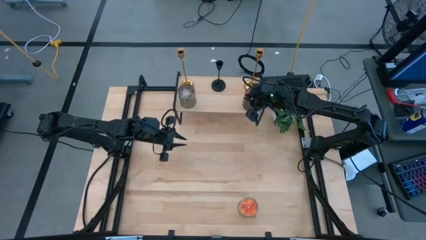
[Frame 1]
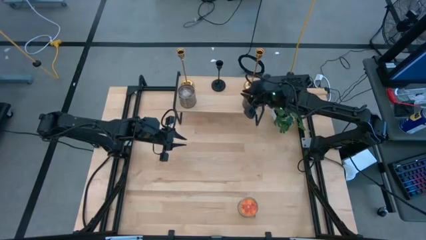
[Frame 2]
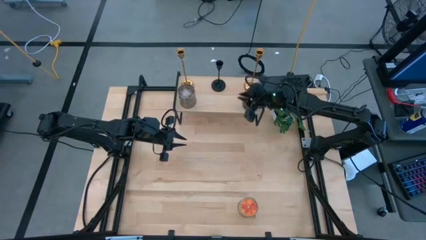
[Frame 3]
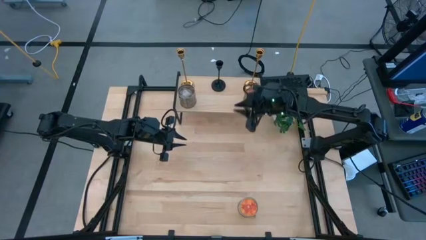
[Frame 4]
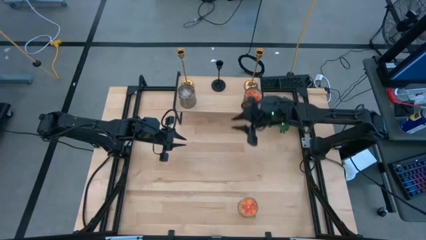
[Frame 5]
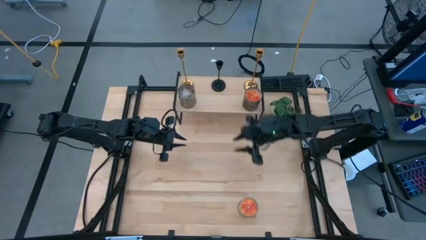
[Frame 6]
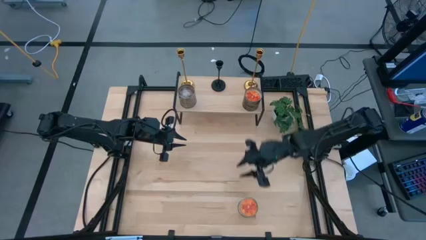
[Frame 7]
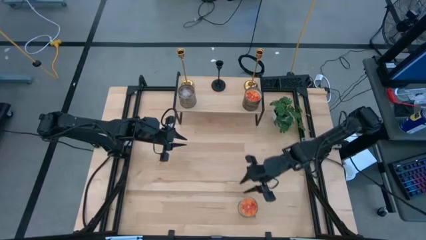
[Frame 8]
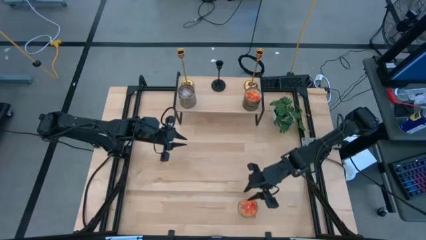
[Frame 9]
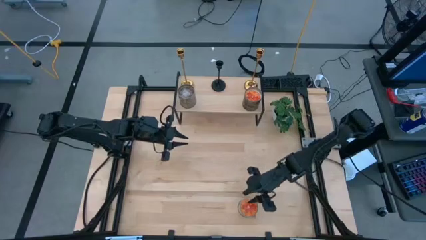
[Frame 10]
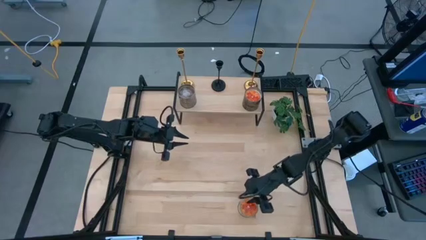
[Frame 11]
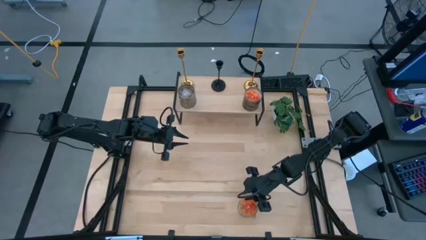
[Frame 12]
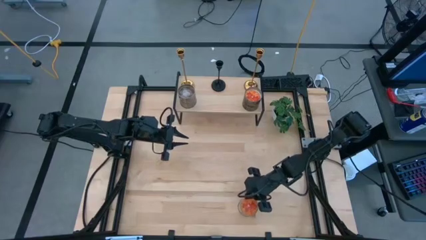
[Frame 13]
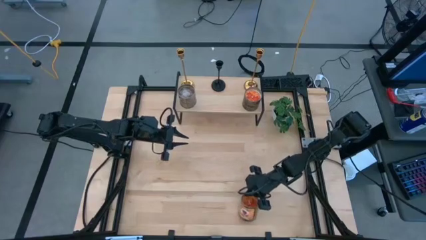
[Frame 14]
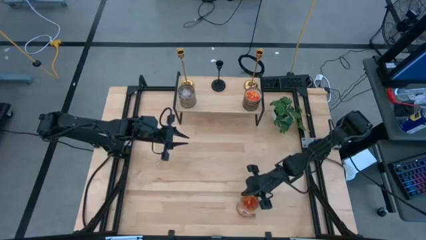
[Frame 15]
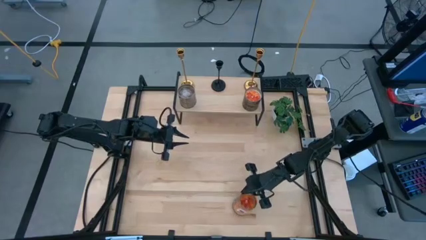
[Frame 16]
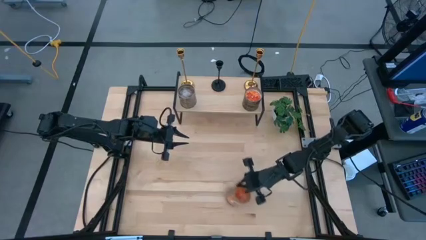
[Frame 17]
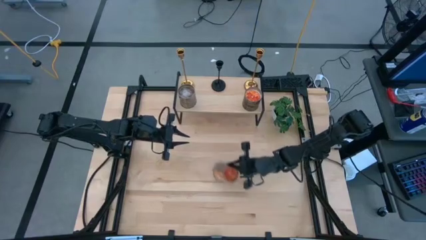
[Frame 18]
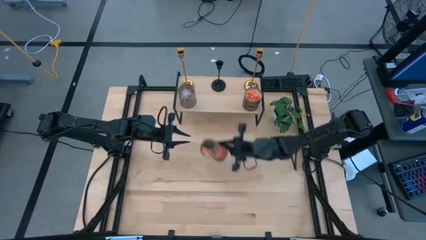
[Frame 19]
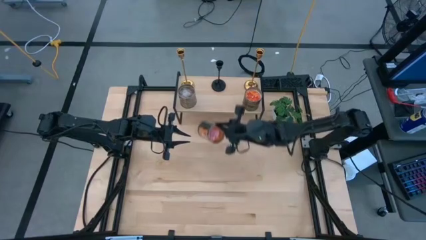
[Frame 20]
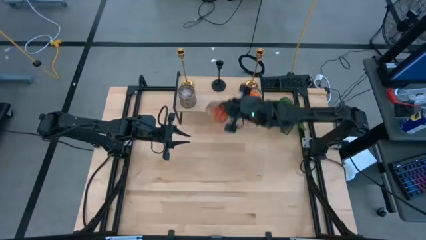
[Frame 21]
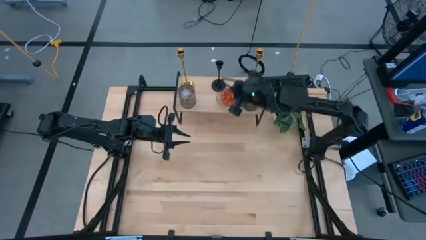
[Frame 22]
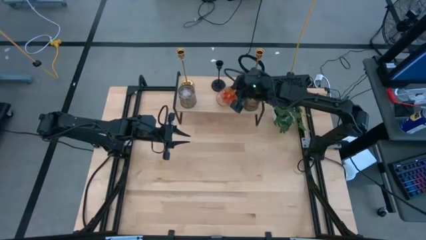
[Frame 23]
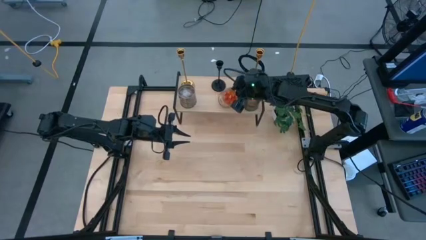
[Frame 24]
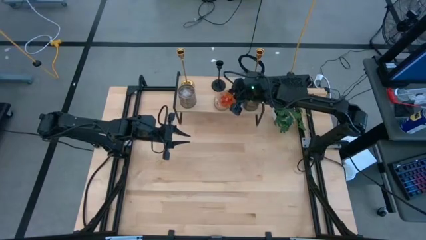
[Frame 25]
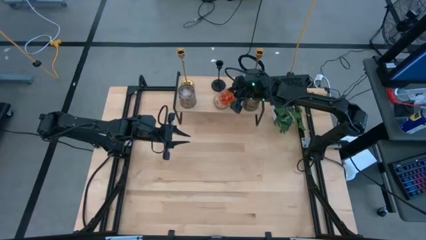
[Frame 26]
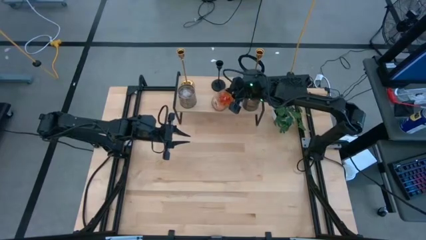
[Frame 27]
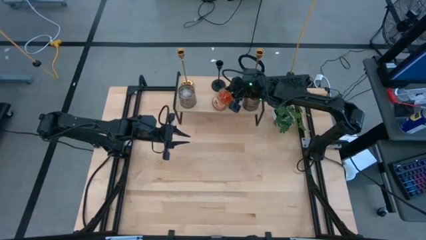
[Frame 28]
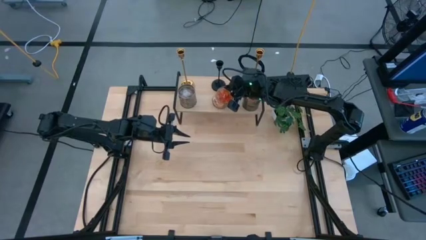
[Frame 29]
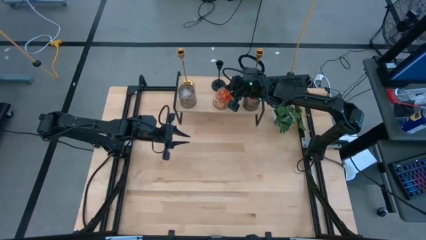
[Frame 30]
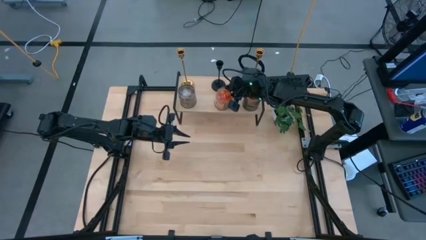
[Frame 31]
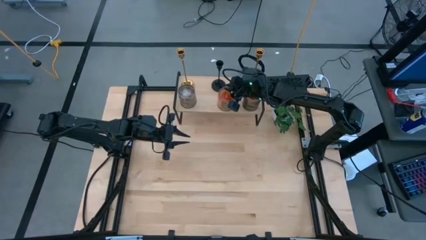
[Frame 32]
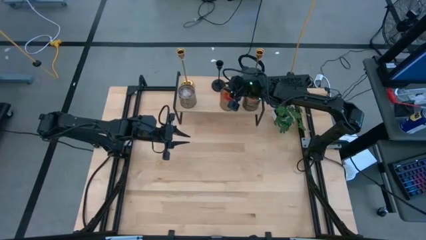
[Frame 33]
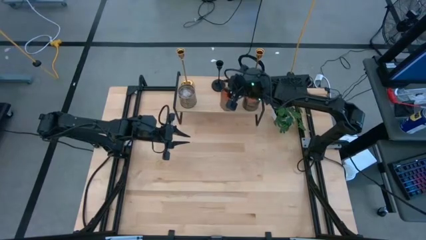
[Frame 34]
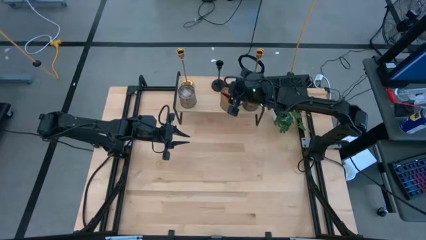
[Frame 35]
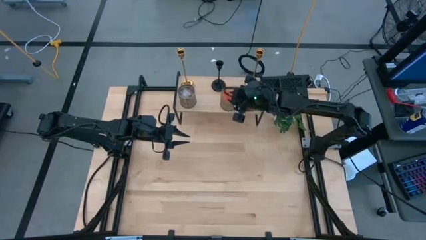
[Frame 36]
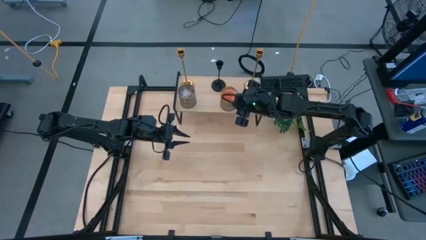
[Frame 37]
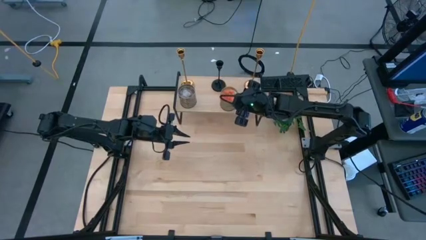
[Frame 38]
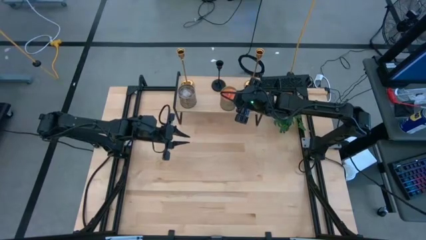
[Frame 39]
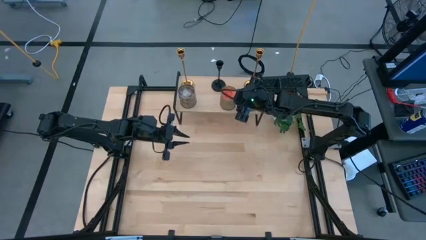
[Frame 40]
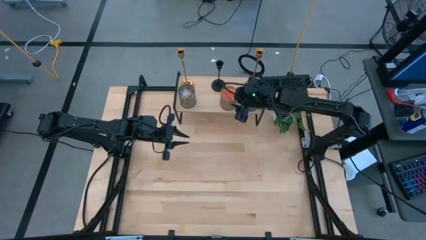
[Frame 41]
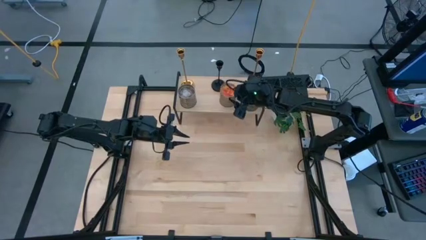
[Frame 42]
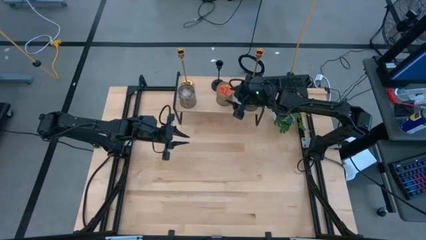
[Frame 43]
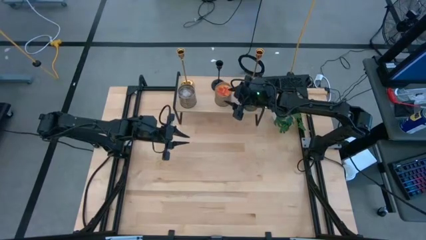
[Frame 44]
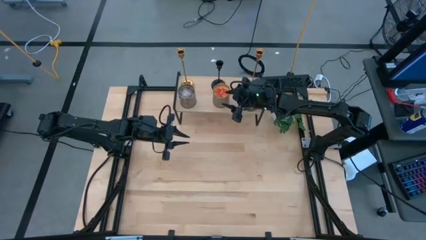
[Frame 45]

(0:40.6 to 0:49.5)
Task: Pick & Place candle stick holders
Put the orange scented candle on the shelf

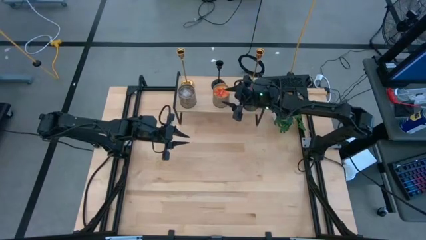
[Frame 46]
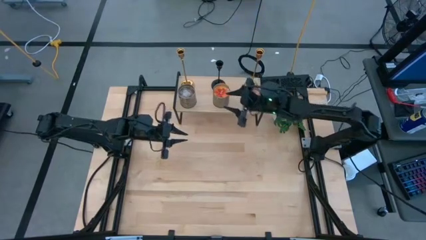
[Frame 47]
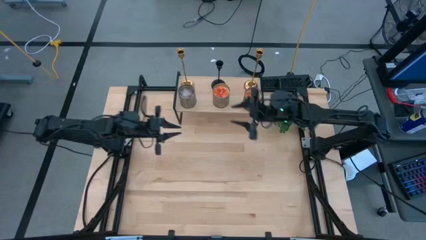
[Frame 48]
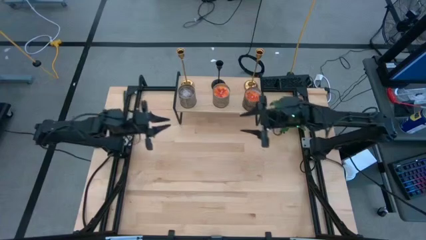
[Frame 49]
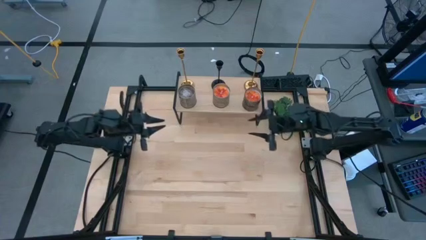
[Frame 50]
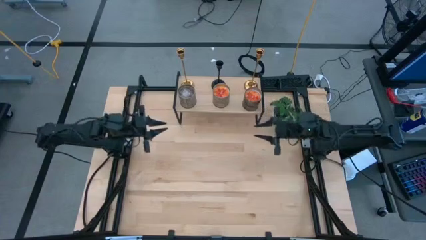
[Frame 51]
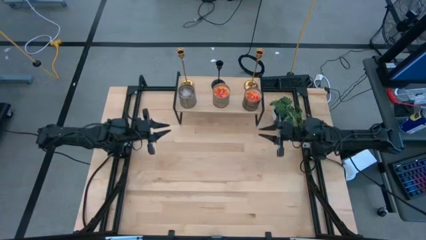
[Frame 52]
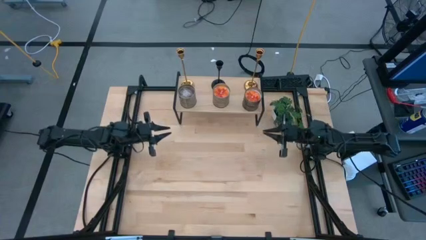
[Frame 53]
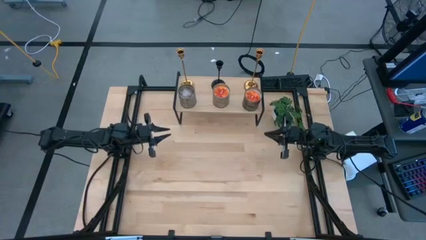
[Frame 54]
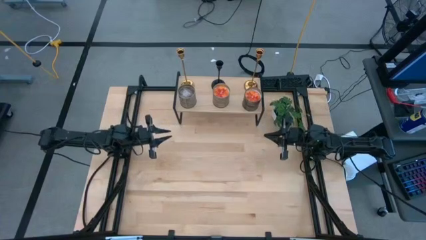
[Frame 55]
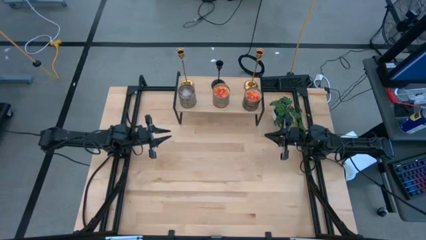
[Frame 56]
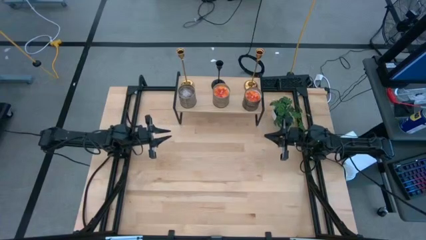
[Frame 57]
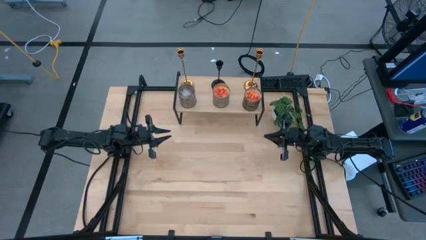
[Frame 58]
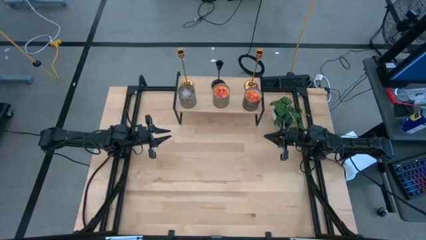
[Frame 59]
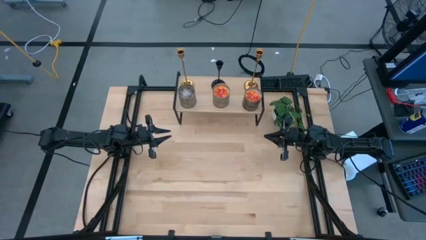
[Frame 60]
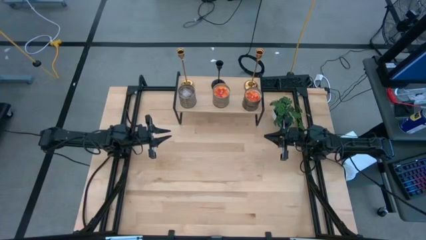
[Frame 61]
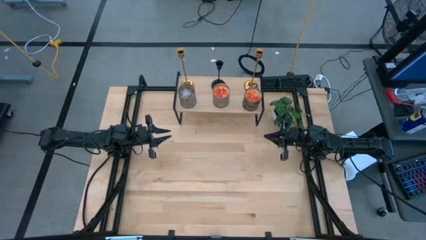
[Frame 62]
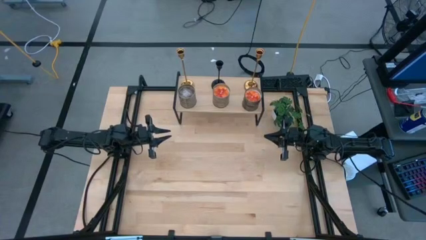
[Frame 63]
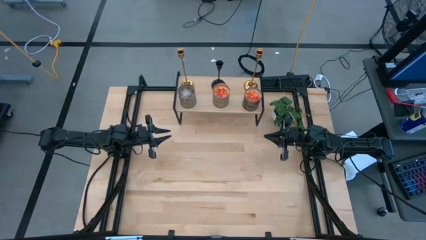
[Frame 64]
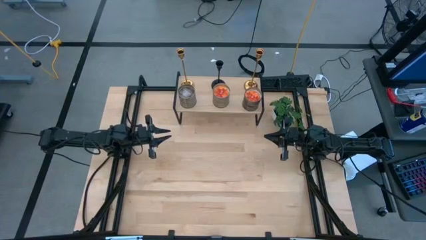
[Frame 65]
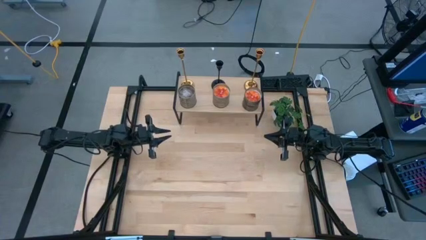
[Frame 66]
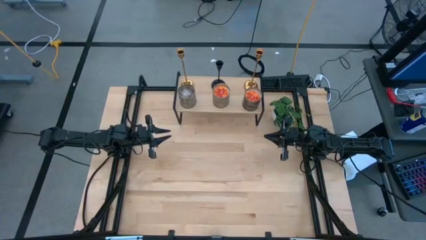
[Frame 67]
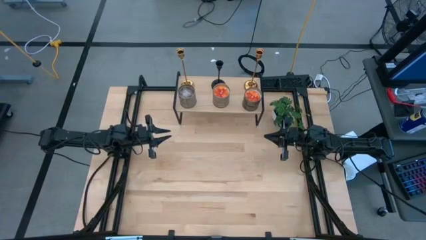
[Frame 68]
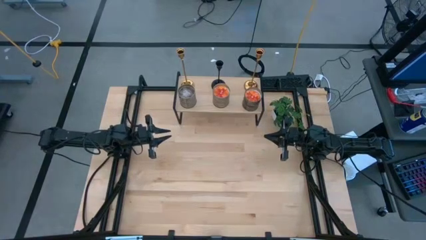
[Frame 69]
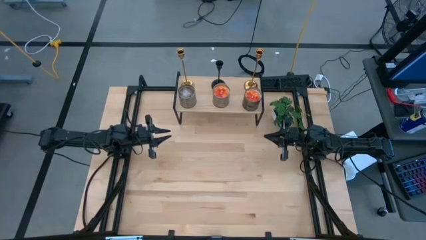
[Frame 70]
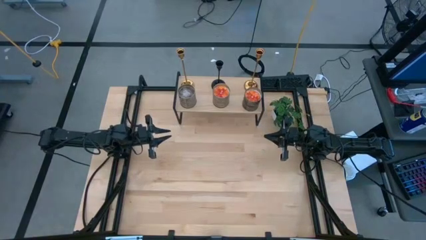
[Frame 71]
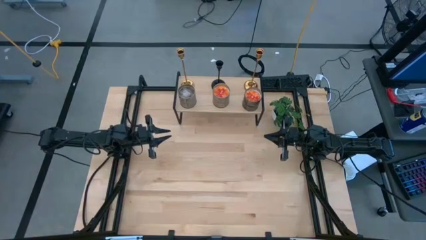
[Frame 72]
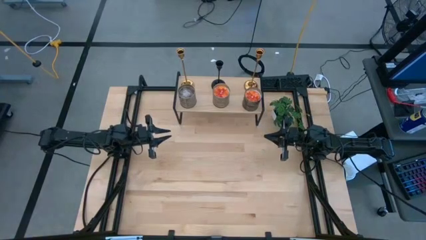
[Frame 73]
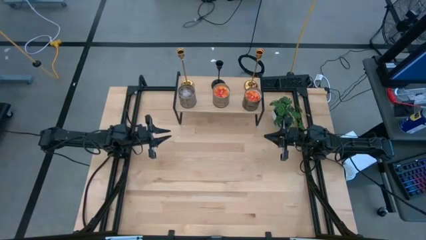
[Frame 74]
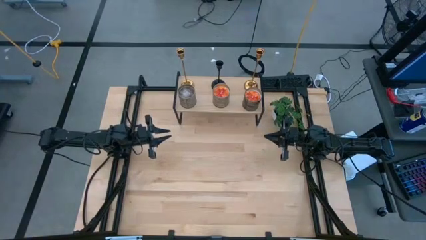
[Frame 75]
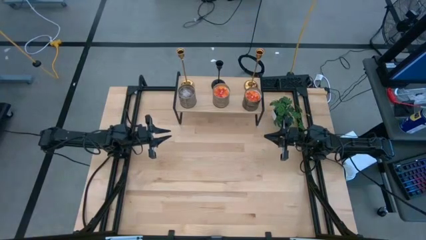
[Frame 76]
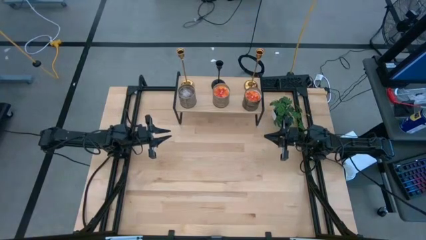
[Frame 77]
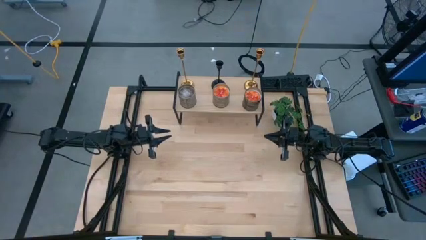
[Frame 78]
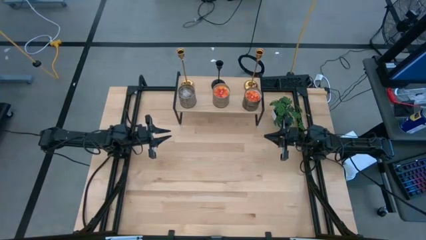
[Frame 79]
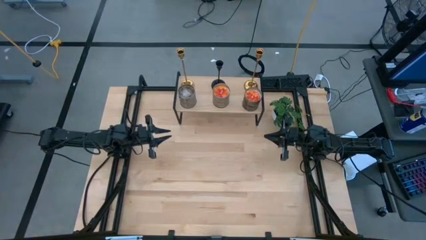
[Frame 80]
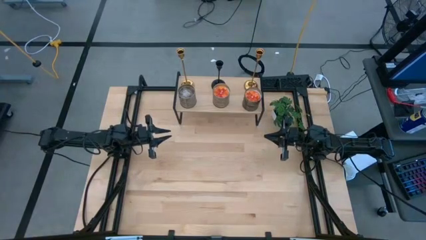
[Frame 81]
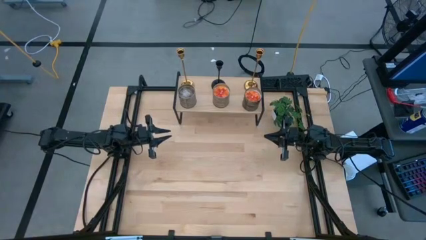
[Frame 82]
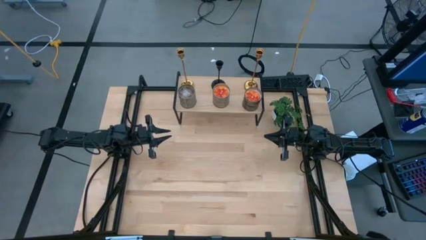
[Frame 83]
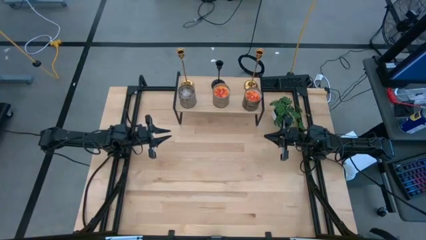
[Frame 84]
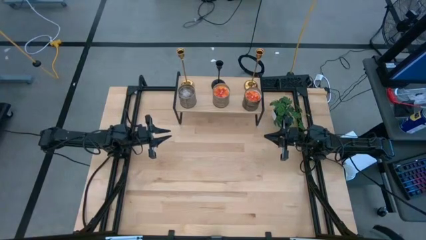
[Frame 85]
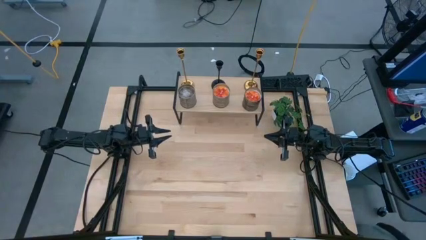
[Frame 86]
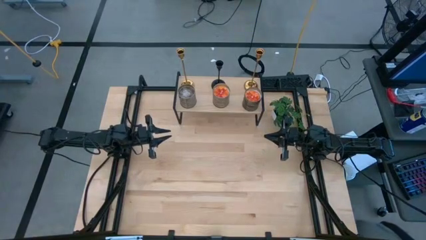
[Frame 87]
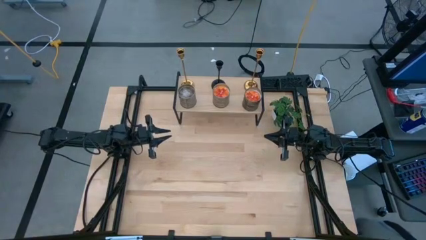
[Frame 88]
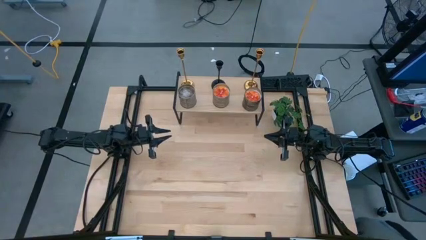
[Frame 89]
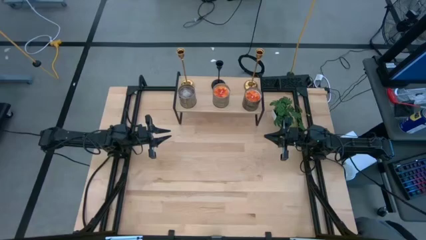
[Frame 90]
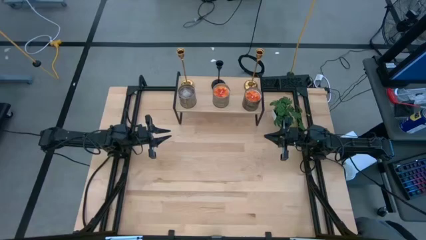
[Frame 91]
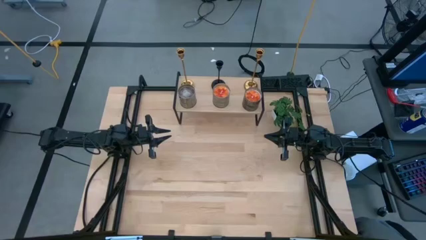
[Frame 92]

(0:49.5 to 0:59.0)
Return to Home Position
